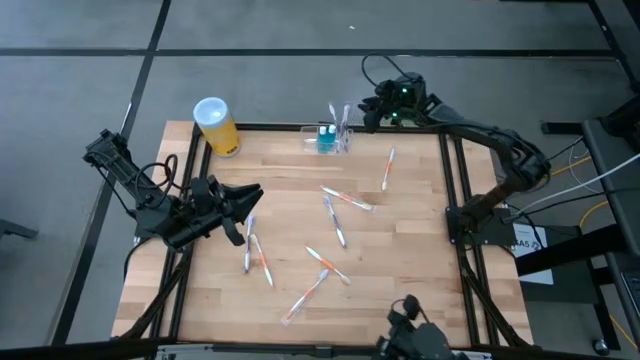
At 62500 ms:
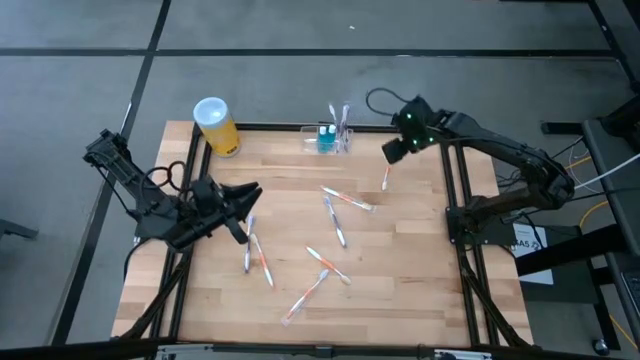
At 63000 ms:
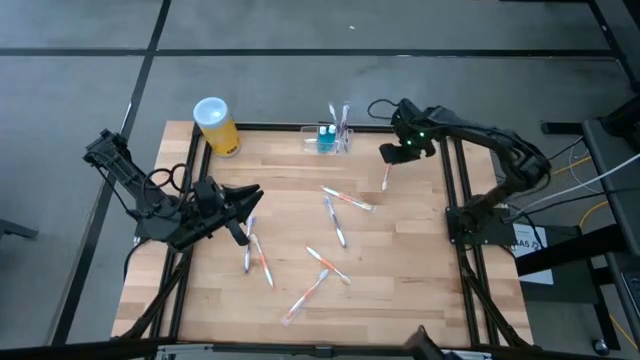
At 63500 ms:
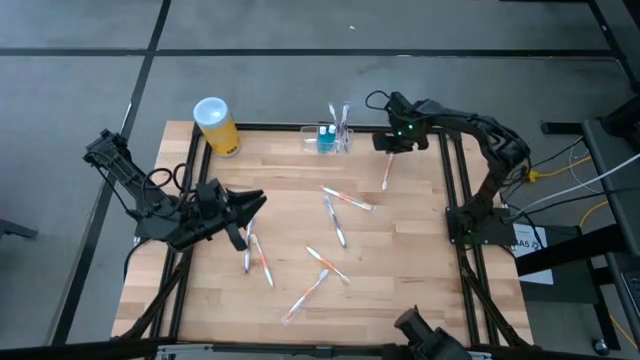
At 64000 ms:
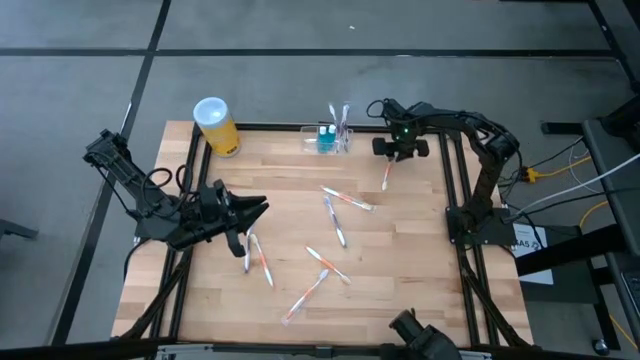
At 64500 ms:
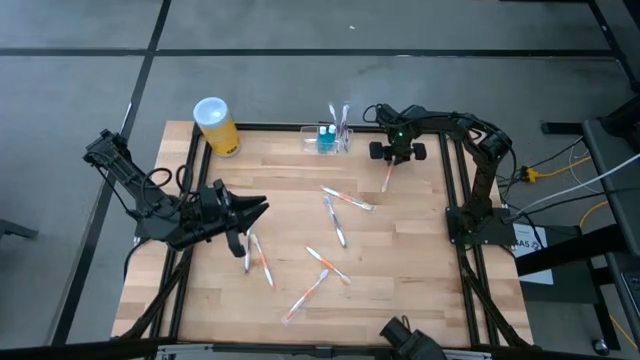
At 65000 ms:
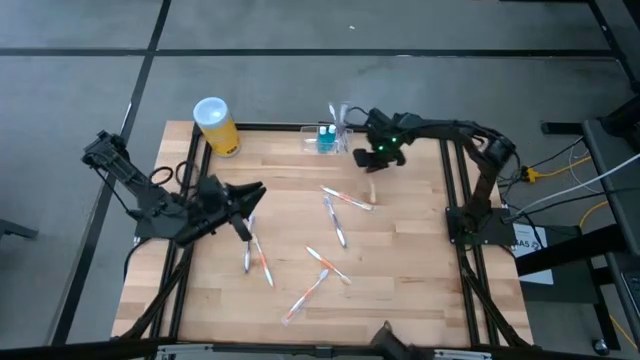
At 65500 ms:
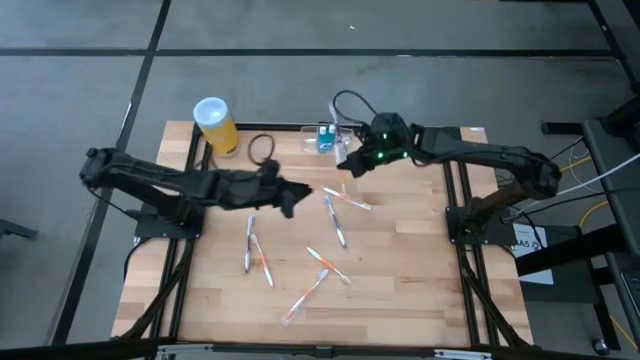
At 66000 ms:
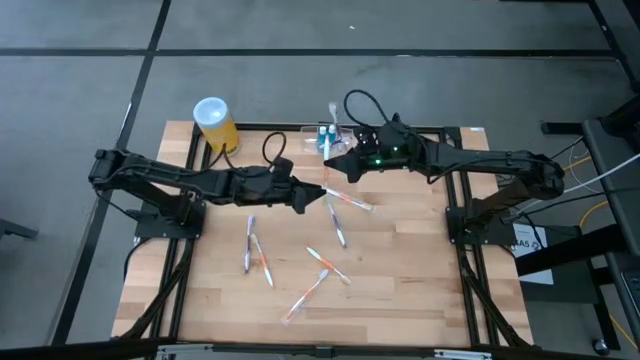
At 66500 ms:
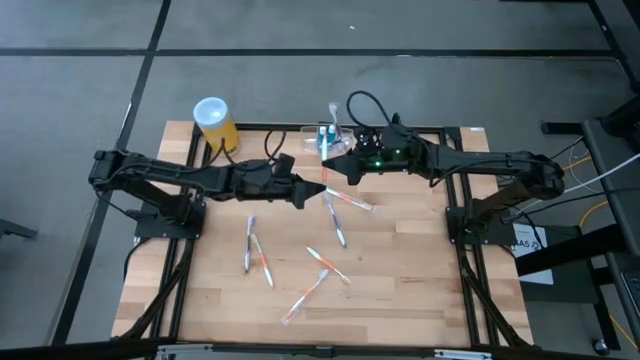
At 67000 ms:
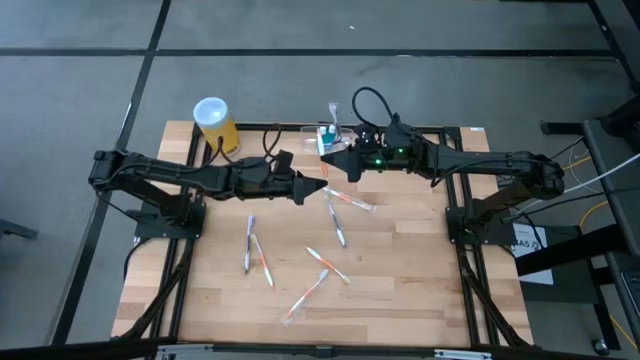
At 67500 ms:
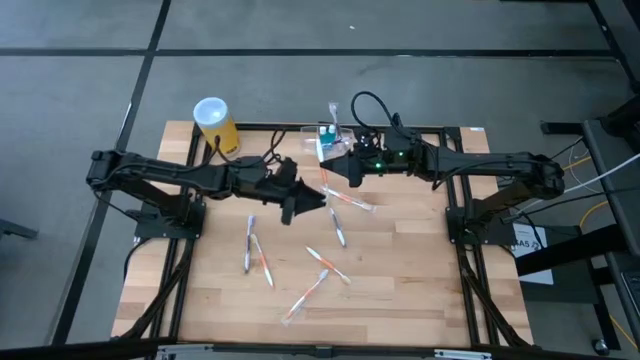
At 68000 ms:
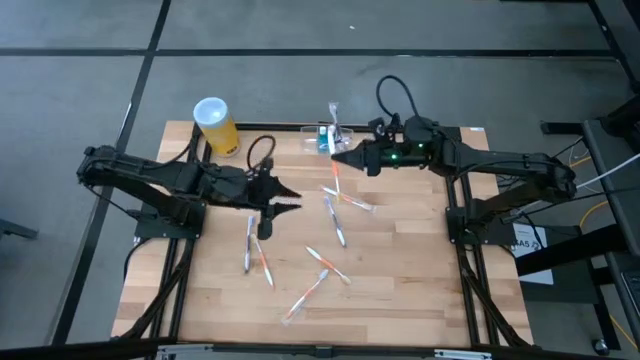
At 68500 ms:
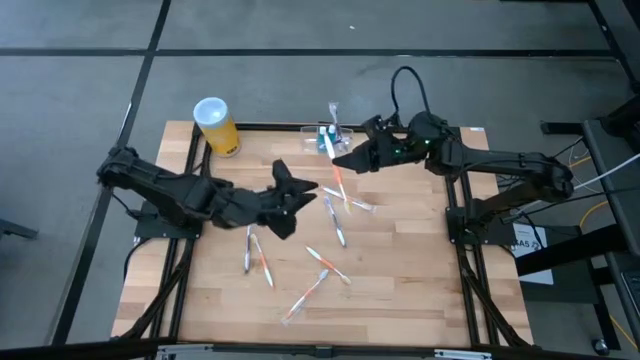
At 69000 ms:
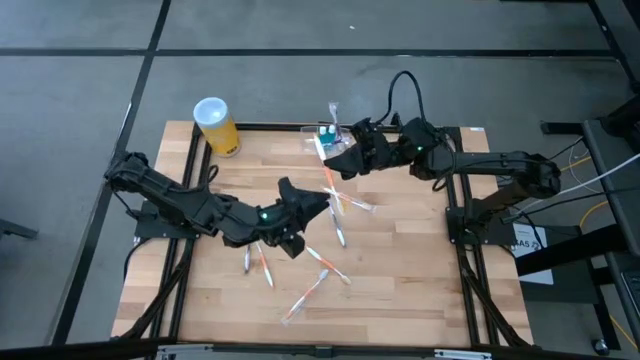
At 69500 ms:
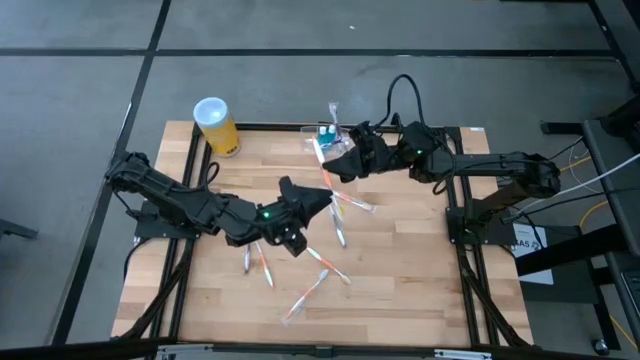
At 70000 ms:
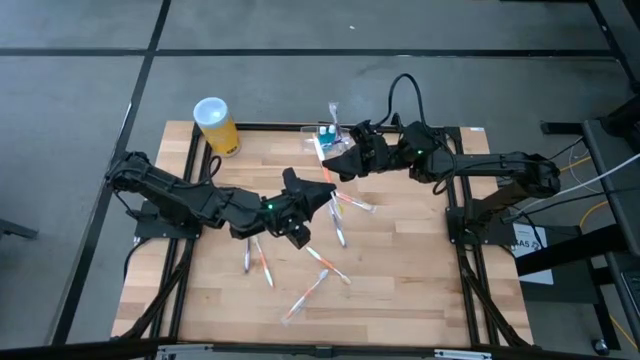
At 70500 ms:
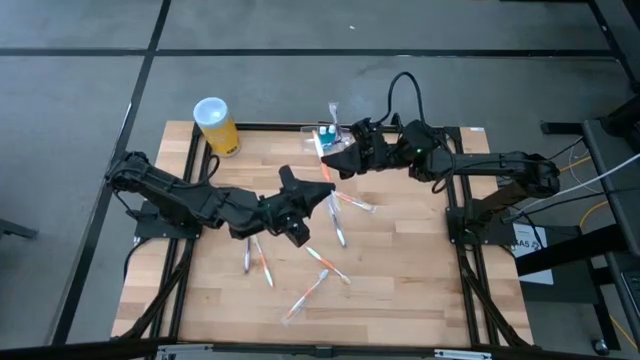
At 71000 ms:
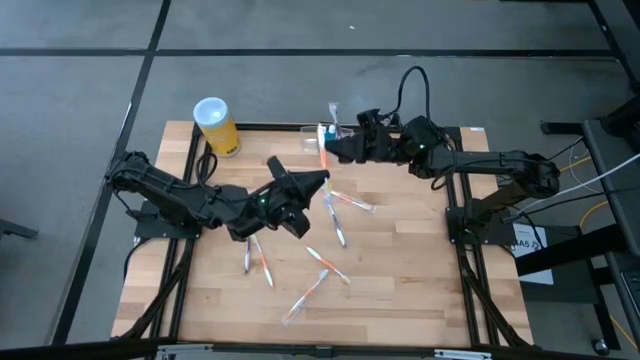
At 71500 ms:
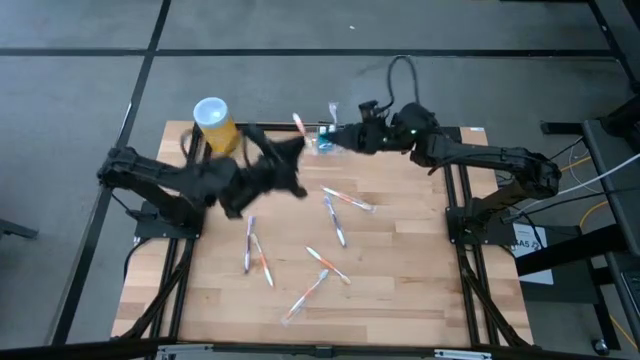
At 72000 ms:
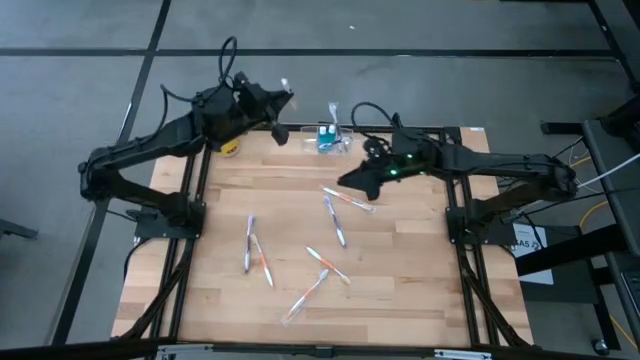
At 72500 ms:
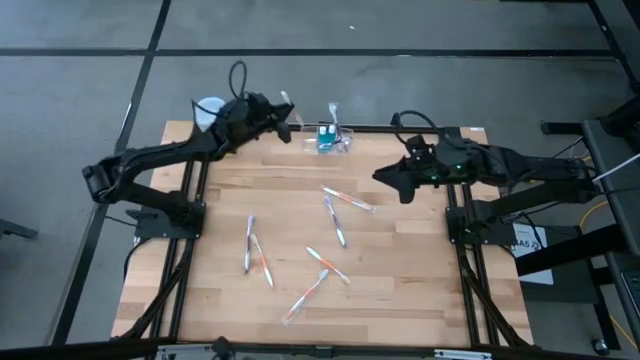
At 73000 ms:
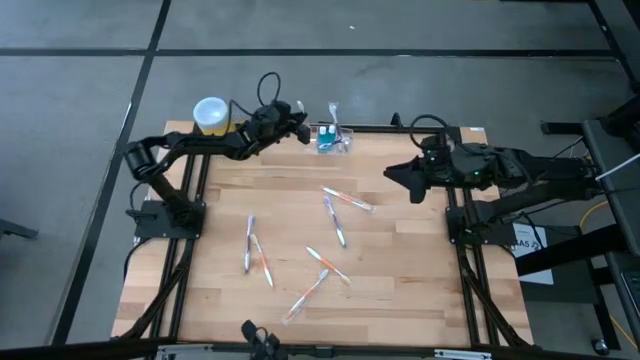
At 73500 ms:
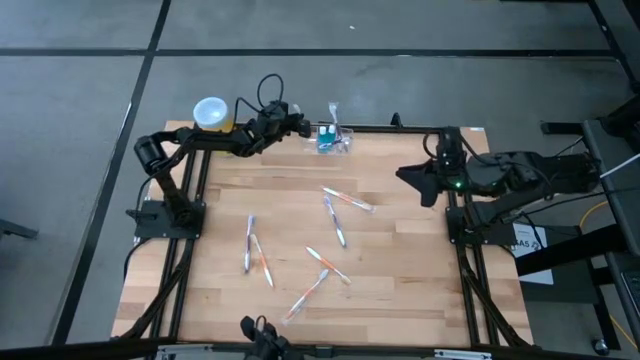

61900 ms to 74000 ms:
Task: Pick & Place toothbrushing station
Put the orange toothbrush into the left section of the transparent organizer

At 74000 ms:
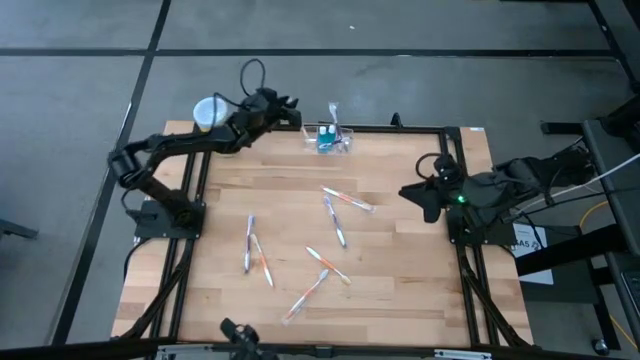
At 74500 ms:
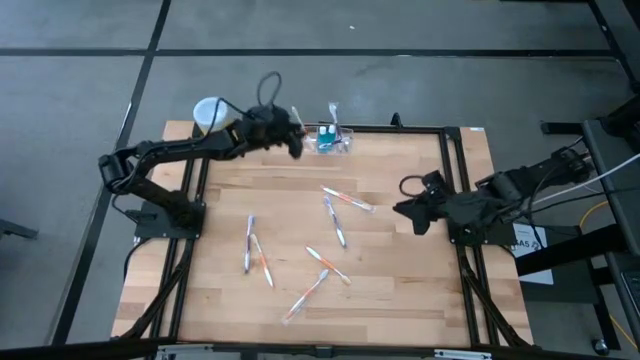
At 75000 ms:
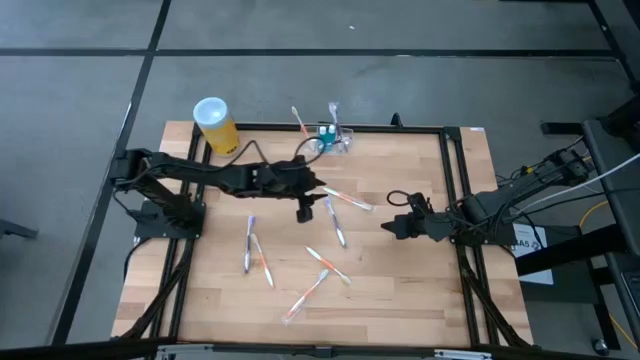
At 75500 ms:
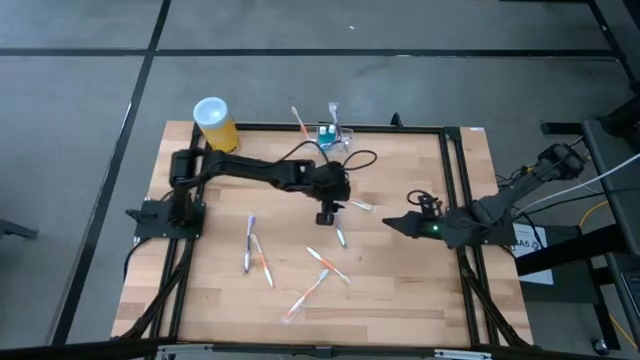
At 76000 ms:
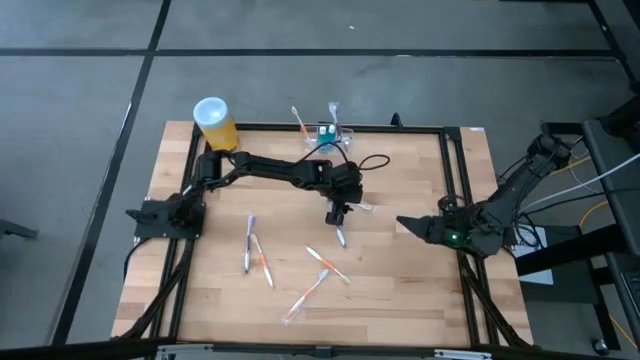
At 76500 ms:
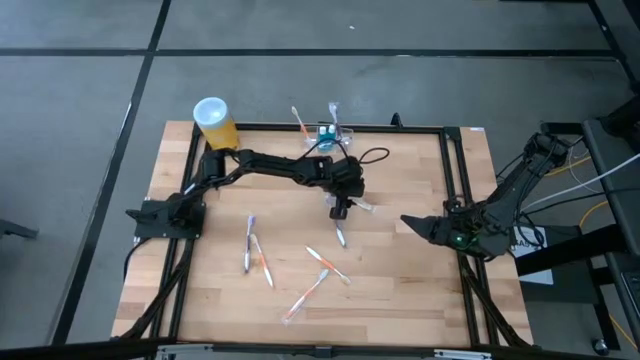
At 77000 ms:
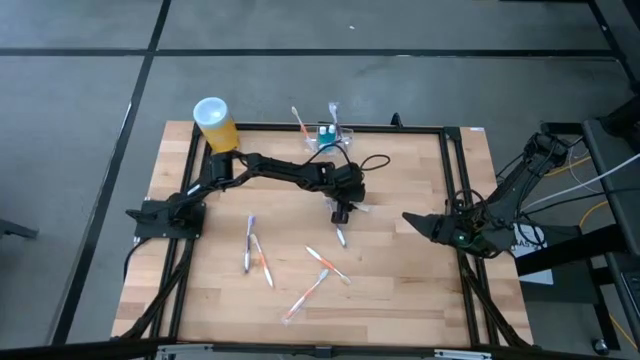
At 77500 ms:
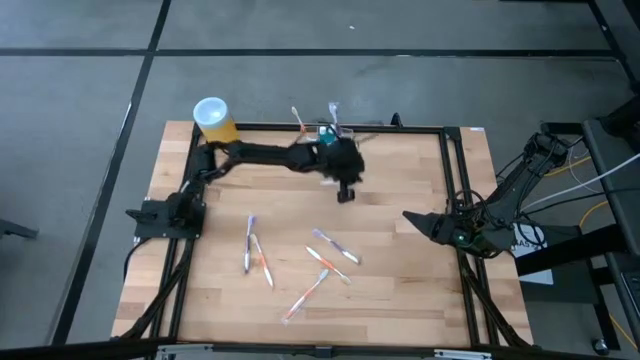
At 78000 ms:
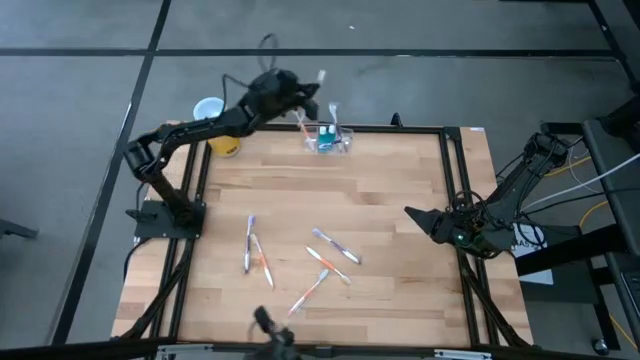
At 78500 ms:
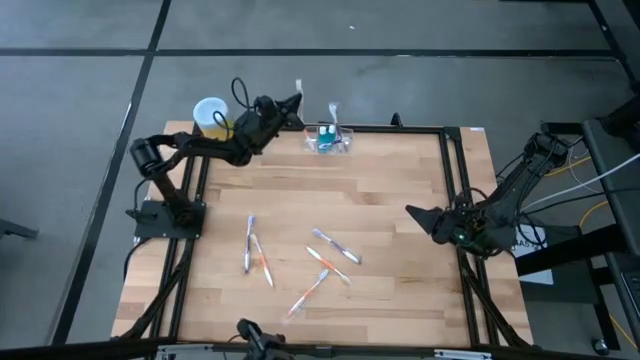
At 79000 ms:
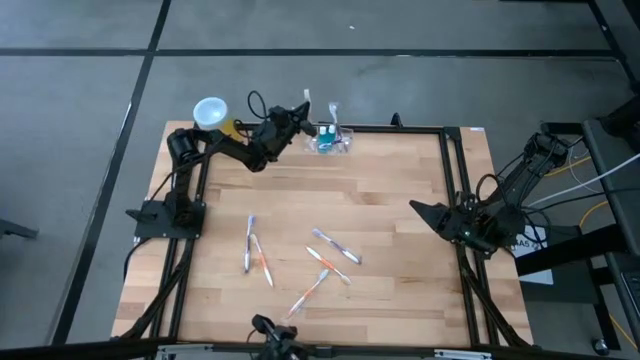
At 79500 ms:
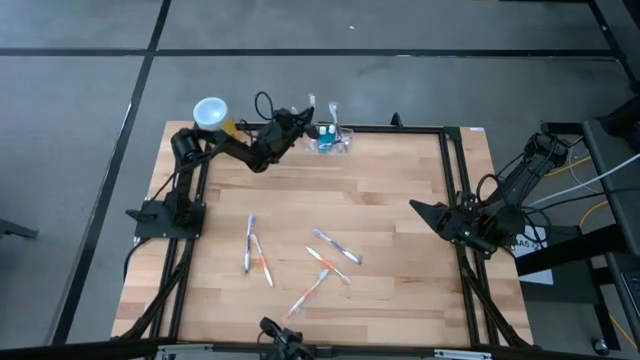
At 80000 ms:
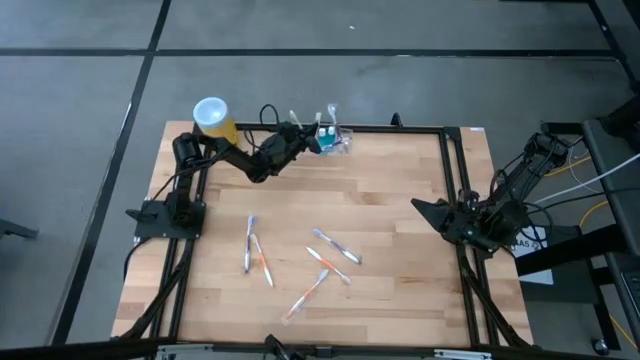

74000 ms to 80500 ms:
Put the orange toothbrush into the left section of the transparent organizer

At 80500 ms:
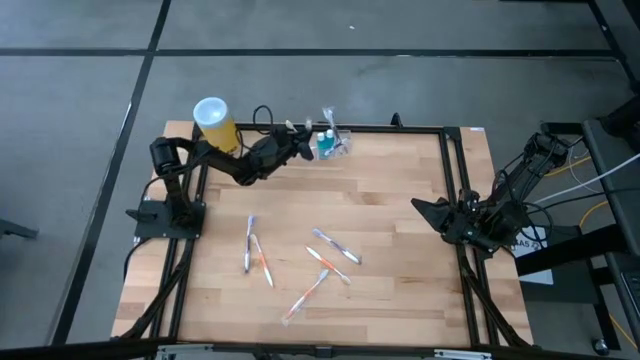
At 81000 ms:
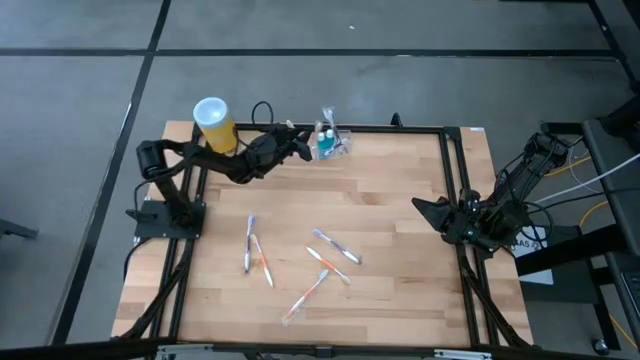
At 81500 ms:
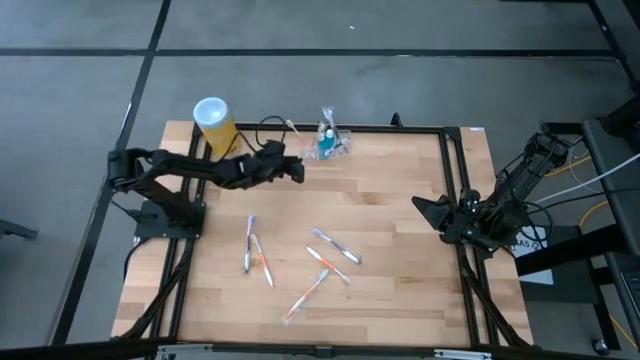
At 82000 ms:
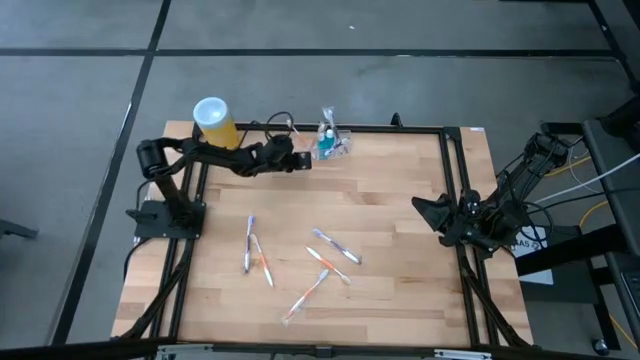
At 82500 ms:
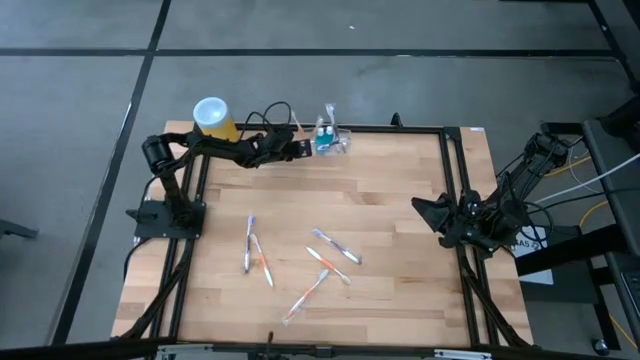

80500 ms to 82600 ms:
Adjust the transparent organizer on the table
